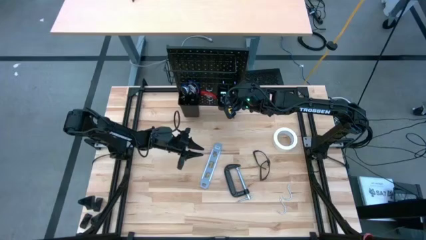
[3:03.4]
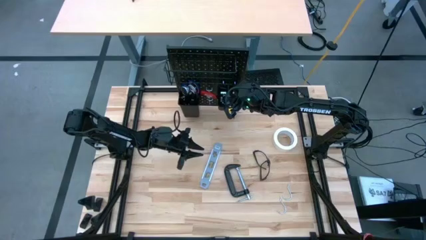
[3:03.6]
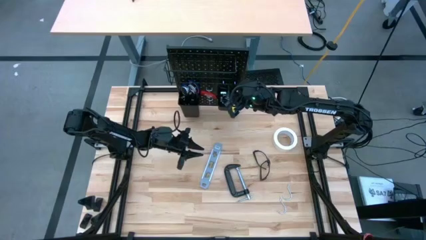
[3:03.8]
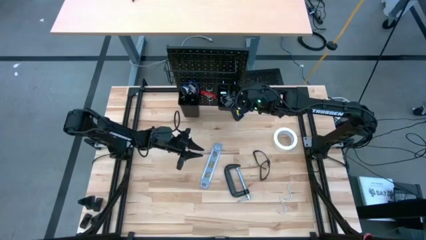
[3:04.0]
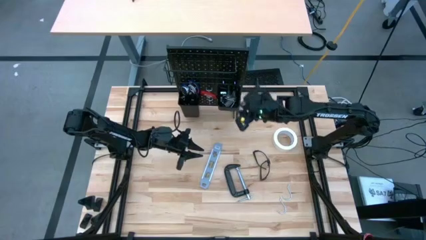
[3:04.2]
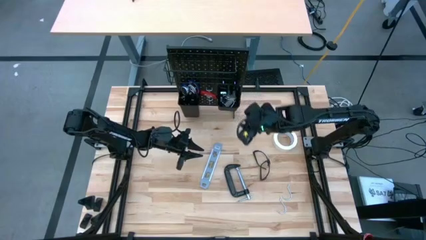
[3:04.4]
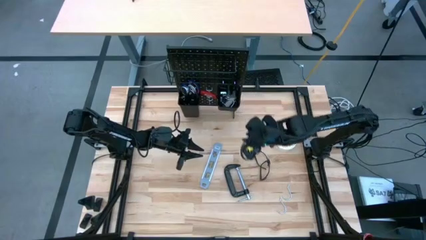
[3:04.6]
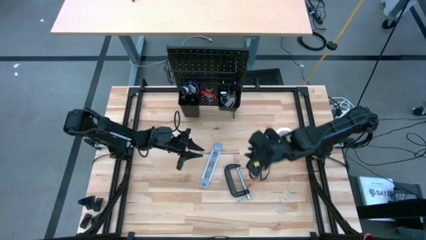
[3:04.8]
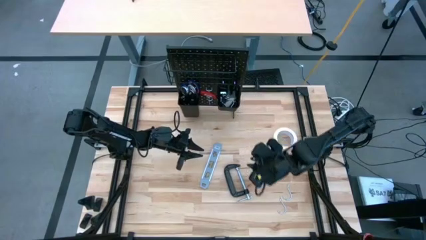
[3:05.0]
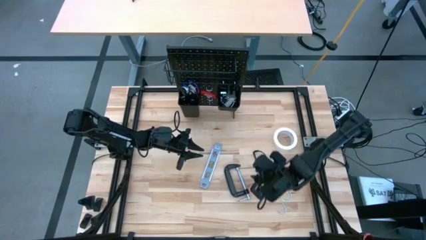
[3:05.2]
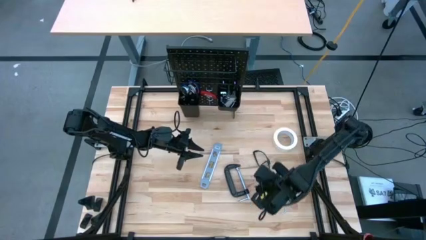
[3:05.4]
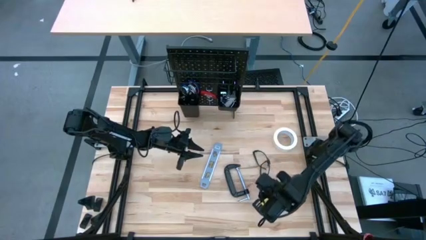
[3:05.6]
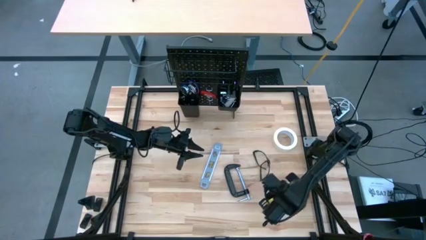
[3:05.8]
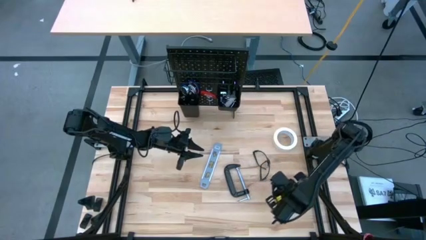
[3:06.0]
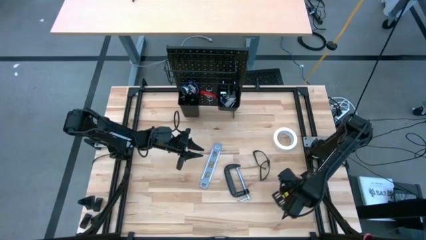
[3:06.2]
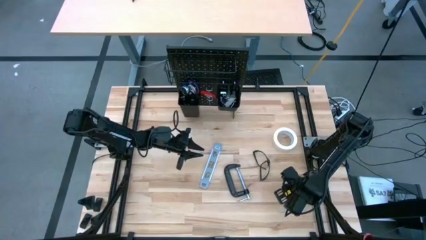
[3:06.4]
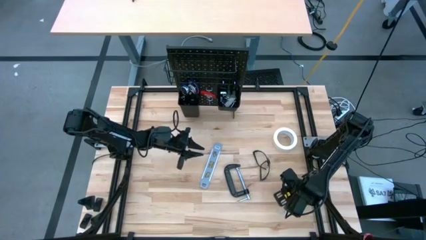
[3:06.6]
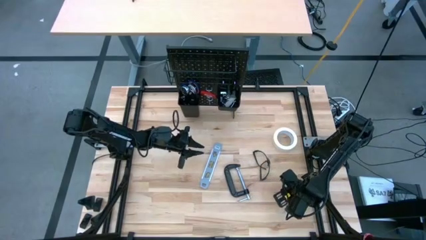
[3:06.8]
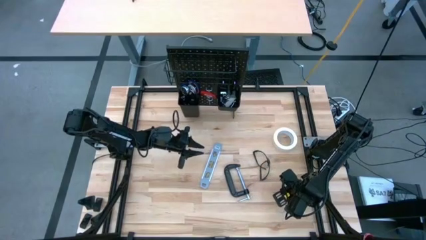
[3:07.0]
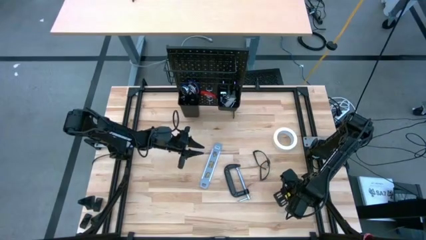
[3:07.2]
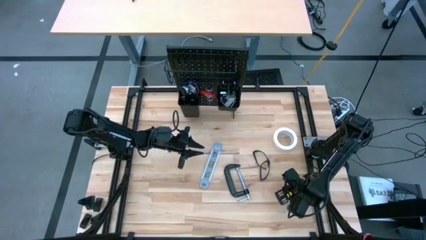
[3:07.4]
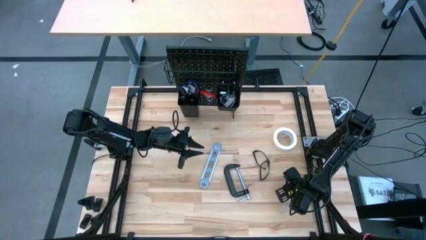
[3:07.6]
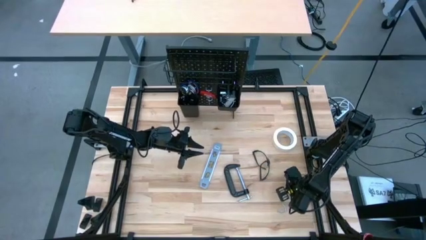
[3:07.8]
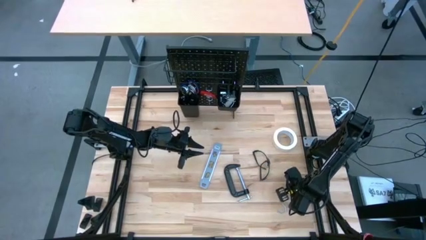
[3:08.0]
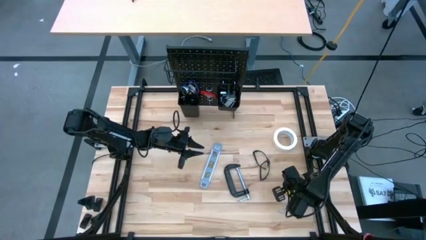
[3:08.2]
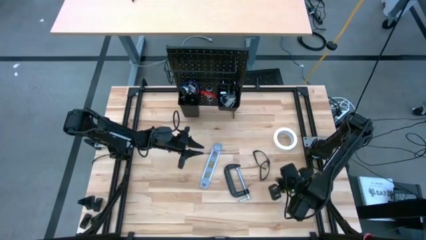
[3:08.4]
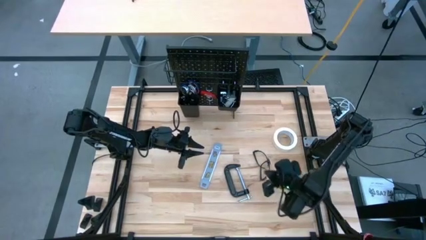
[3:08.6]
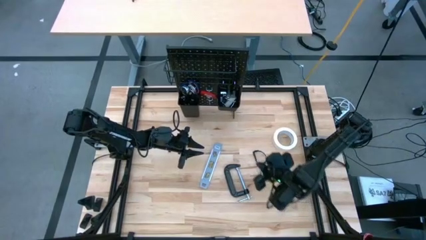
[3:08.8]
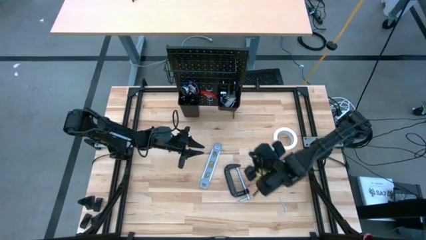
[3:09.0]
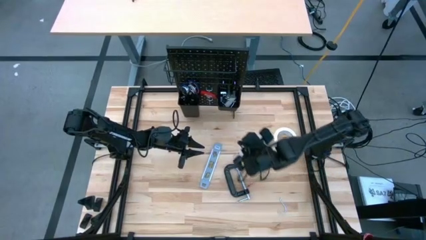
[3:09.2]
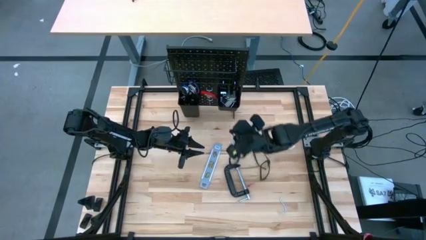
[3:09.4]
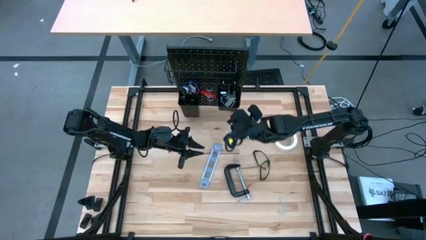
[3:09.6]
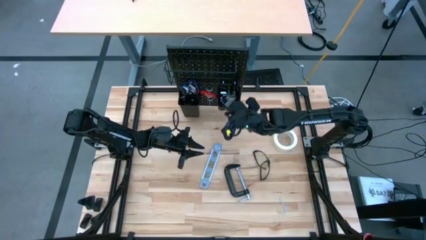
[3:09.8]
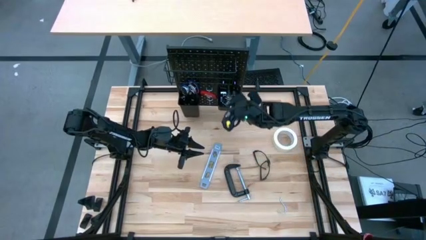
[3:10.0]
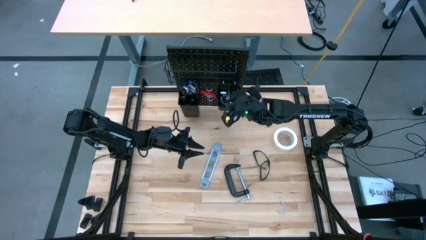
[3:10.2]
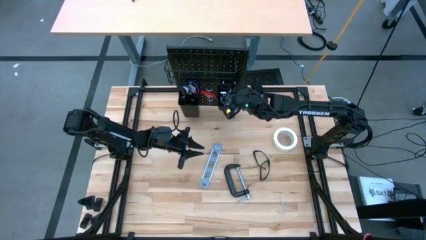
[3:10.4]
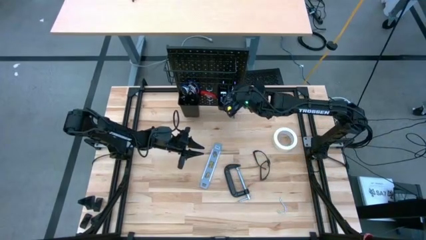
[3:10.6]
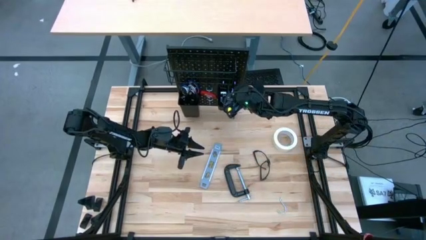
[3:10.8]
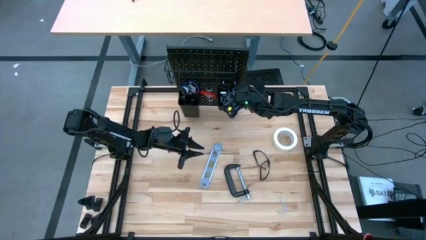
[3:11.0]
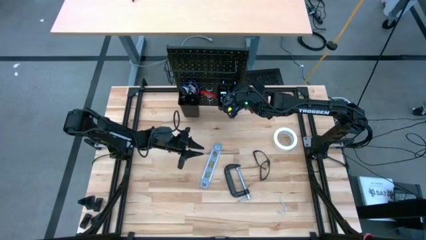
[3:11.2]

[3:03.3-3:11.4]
Task: Hang tools onto peg board
Put the top pegboard hook into the right black bin on the peg board

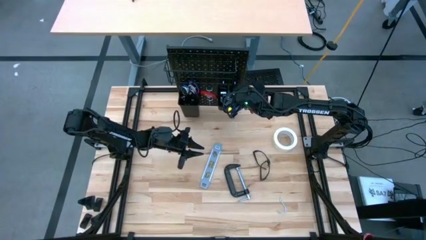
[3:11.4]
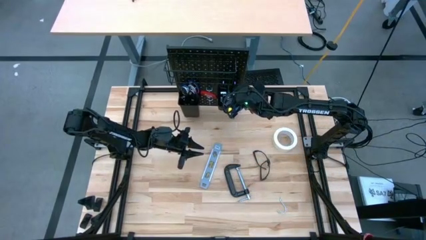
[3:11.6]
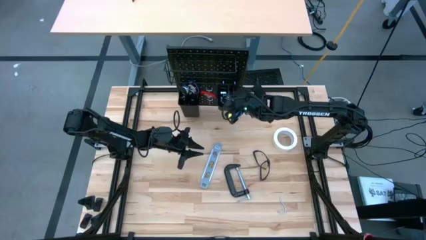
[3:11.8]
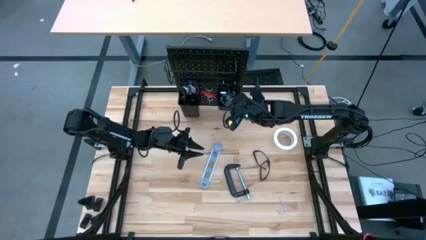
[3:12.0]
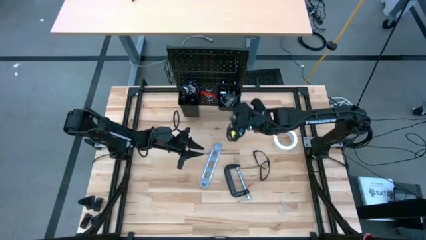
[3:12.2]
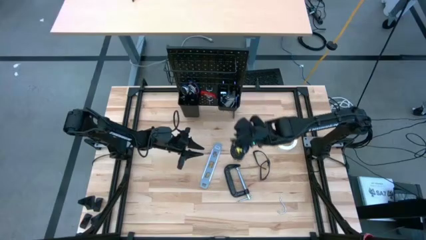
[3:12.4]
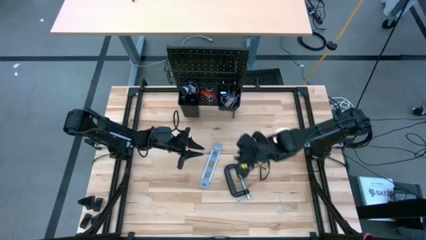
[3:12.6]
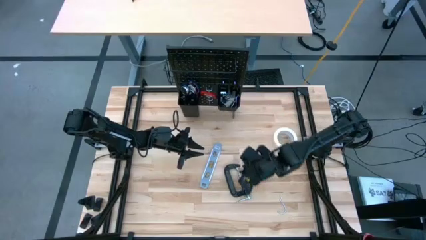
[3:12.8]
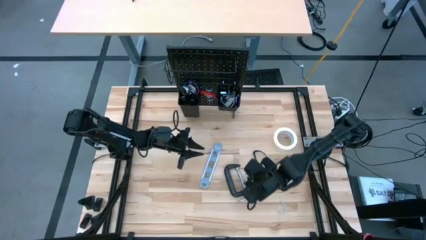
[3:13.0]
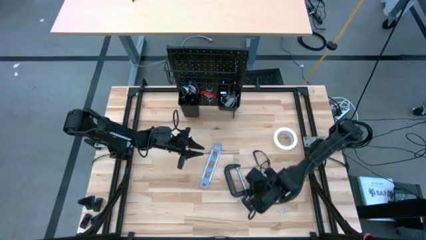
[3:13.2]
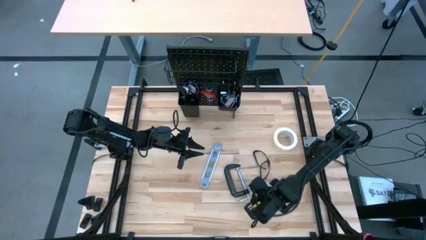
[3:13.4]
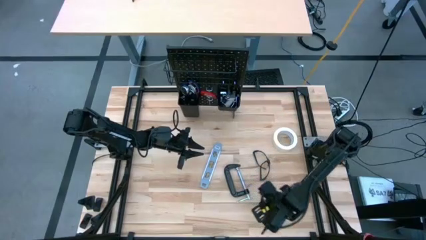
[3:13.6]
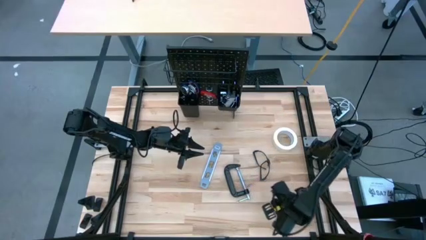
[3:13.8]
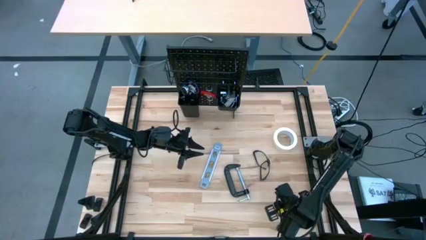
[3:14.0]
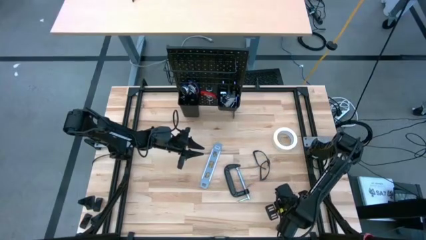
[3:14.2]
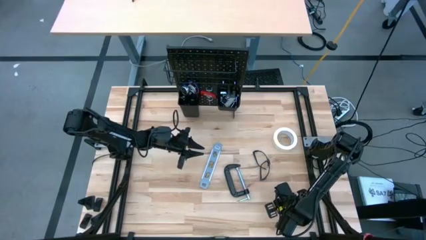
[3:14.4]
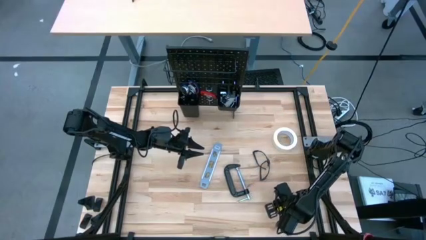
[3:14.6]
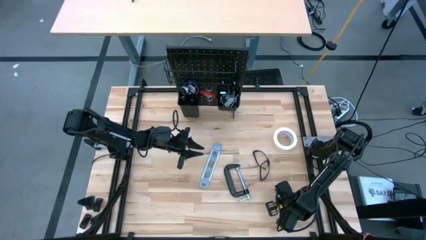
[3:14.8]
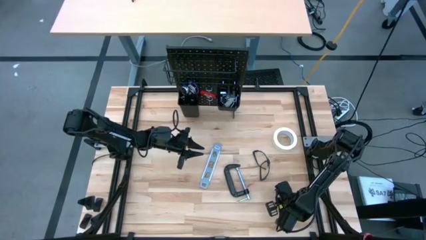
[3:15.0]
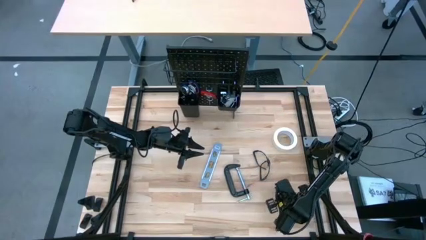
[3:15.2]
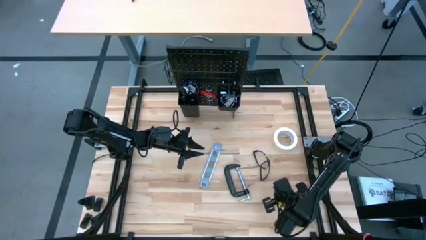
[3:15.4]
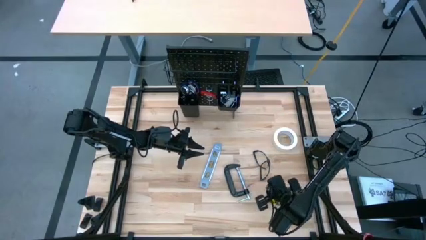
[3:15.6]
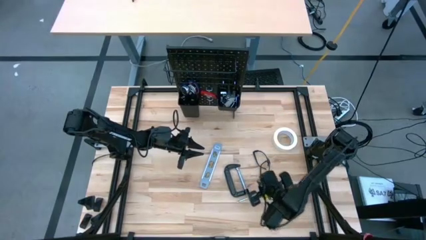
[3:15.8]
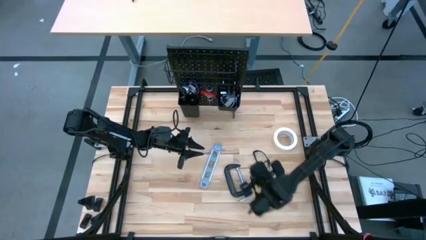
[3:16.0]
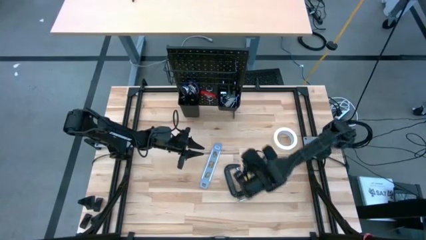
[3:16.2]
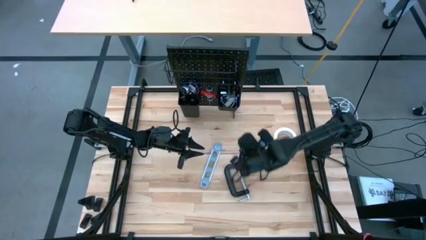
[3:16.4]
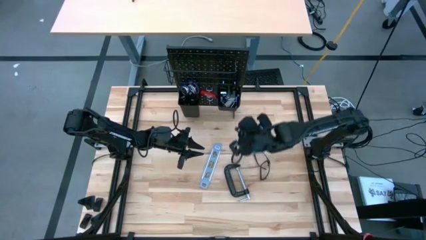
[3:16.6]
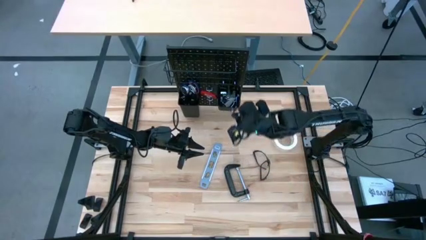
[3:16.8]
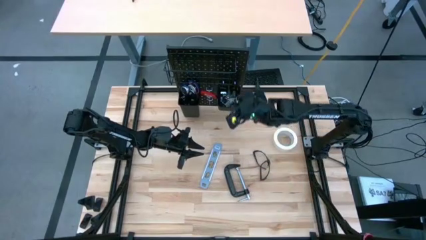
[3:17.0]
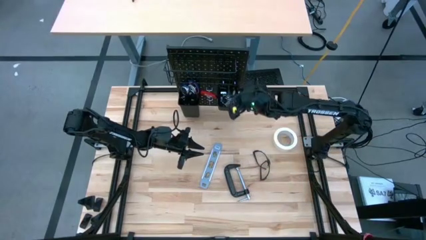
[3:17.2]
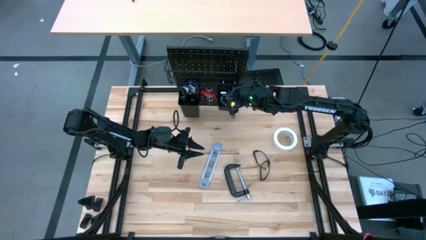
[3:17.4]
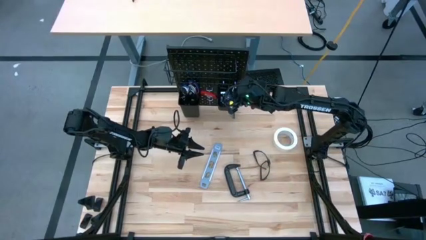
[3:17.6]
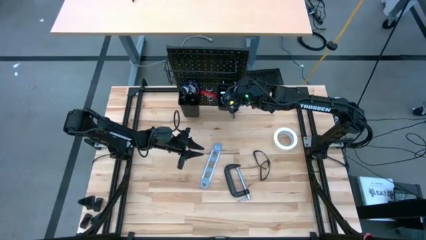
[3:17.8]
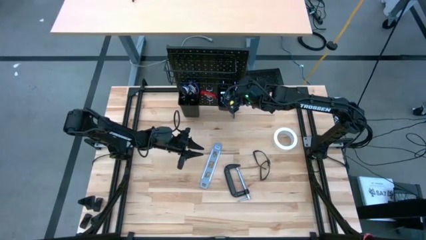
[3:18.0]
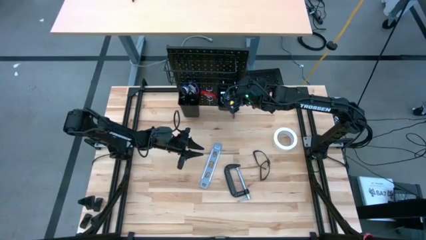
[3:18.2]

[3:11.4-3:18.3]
Put the pegboard hook into the right black bin on the peg board
